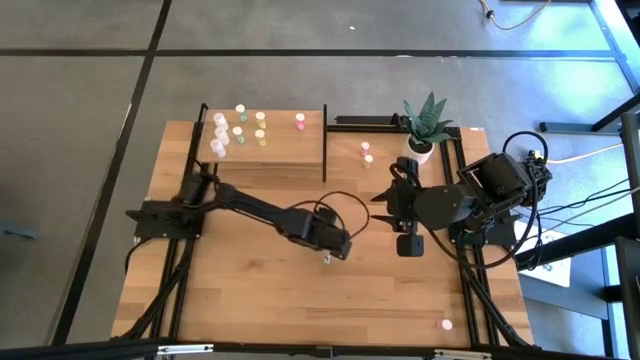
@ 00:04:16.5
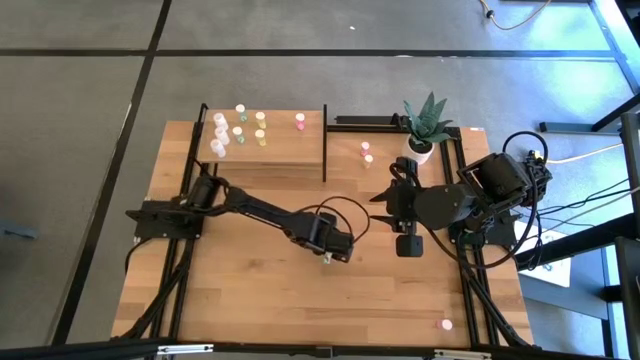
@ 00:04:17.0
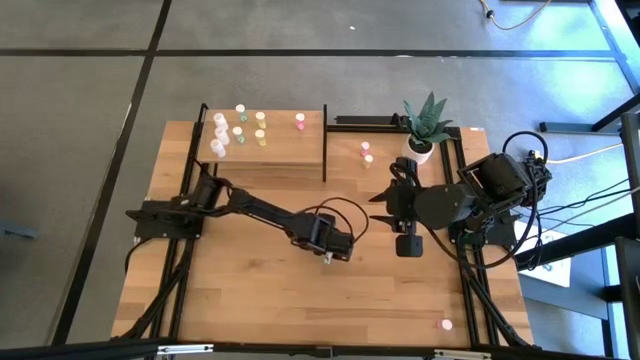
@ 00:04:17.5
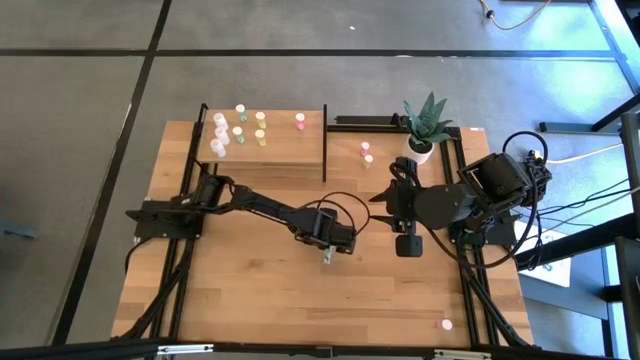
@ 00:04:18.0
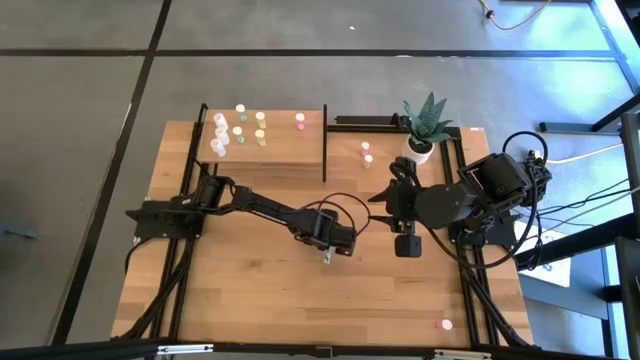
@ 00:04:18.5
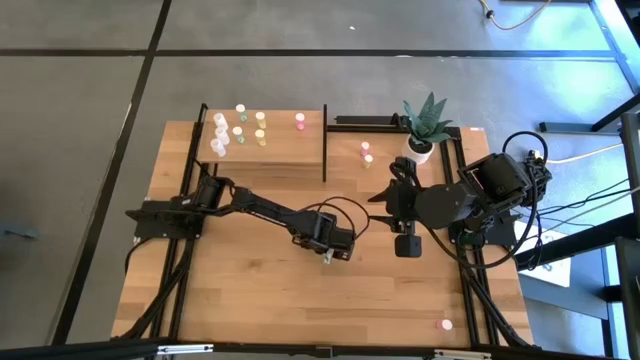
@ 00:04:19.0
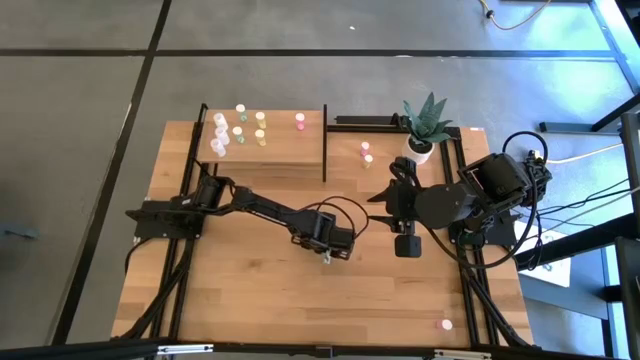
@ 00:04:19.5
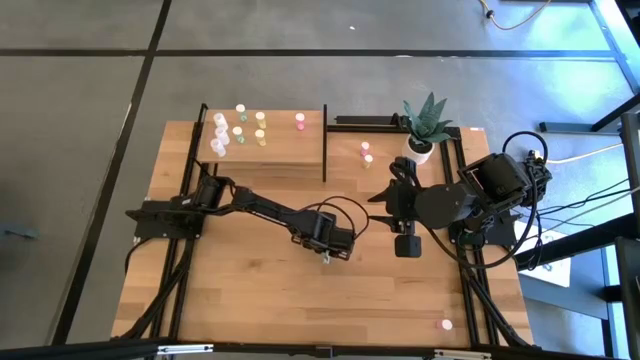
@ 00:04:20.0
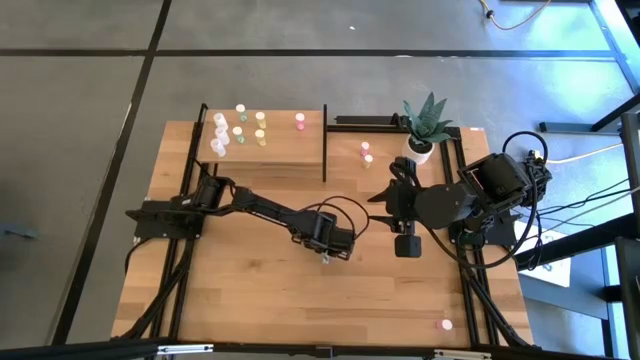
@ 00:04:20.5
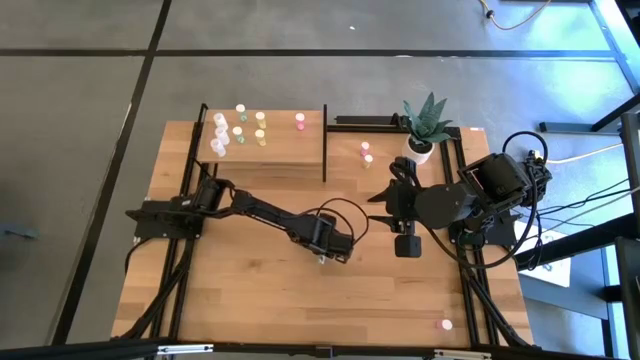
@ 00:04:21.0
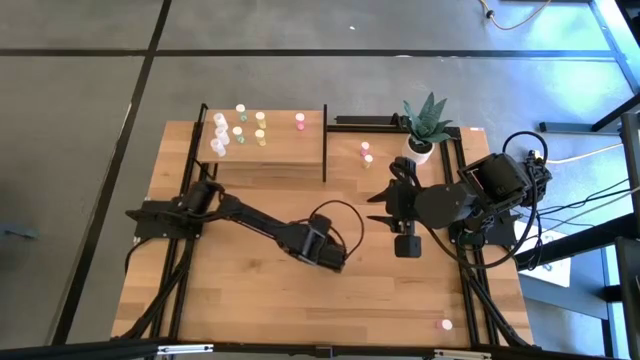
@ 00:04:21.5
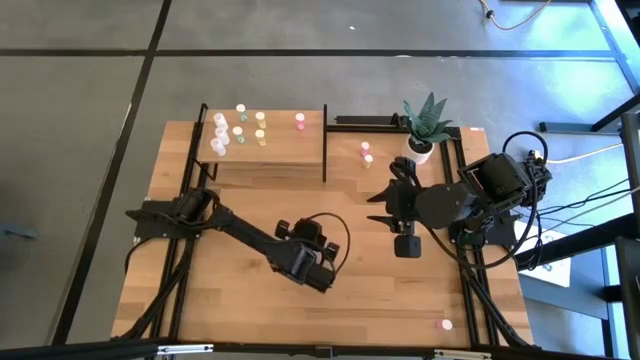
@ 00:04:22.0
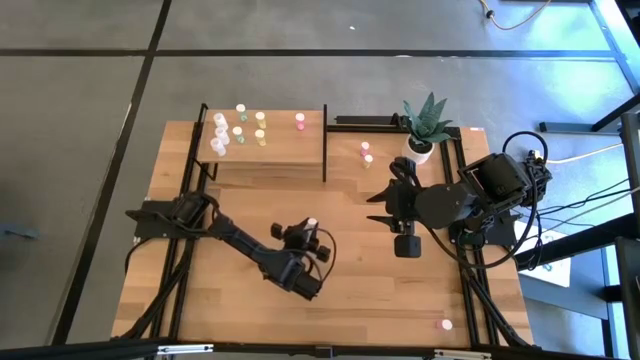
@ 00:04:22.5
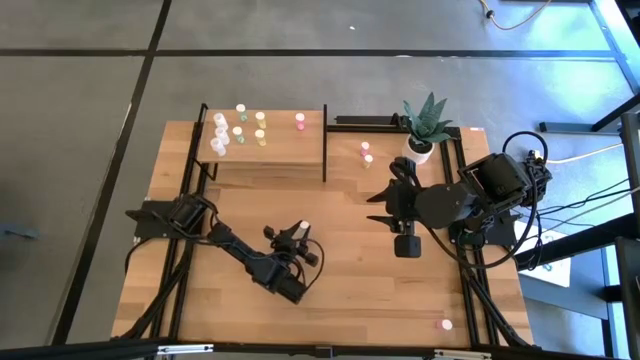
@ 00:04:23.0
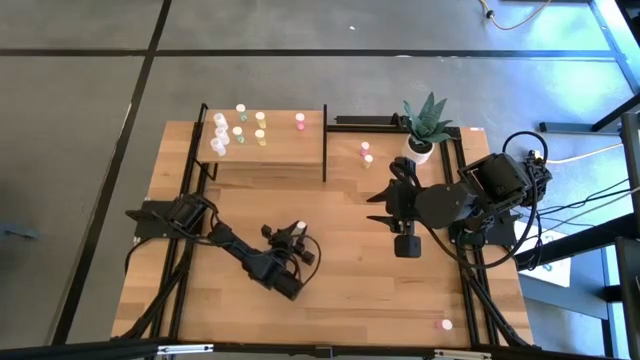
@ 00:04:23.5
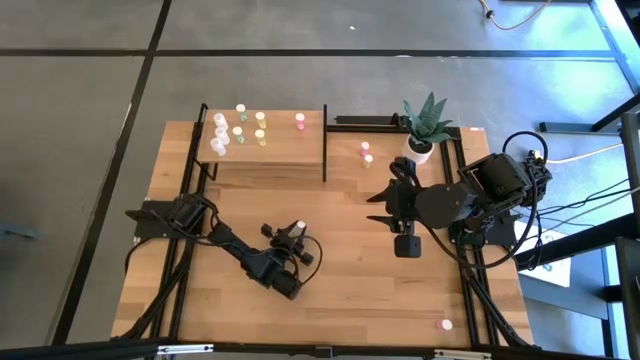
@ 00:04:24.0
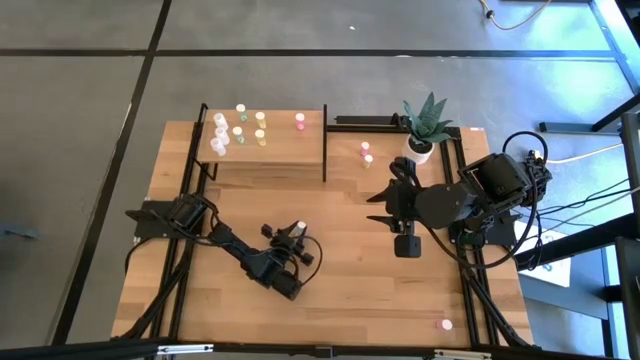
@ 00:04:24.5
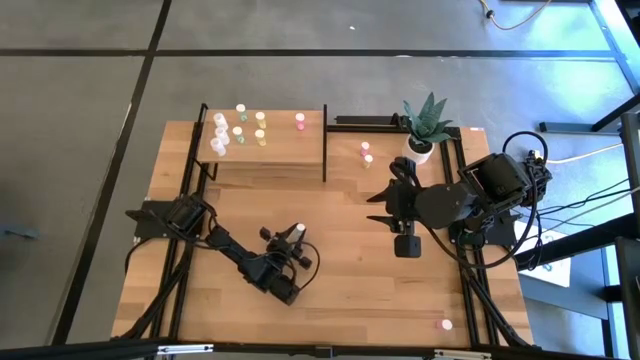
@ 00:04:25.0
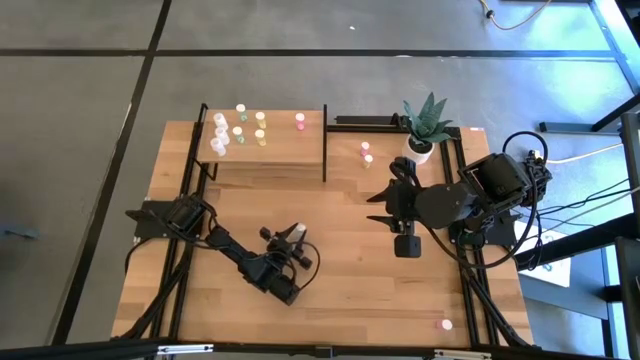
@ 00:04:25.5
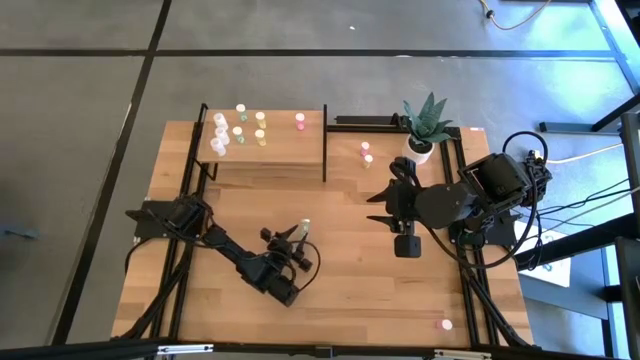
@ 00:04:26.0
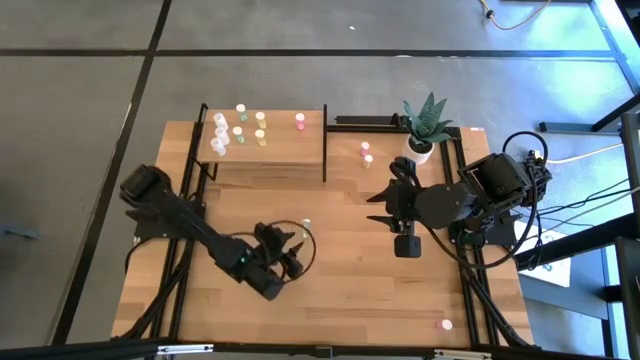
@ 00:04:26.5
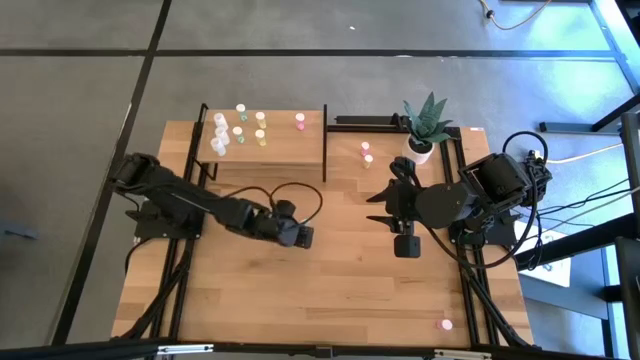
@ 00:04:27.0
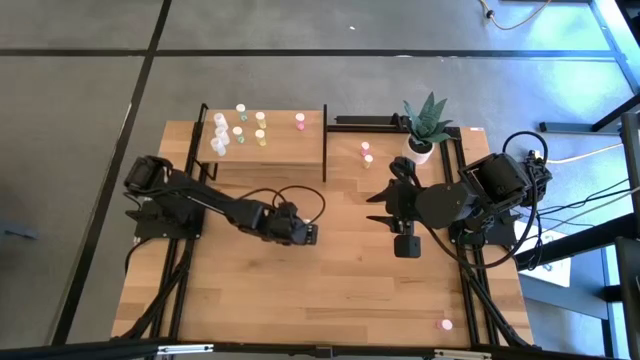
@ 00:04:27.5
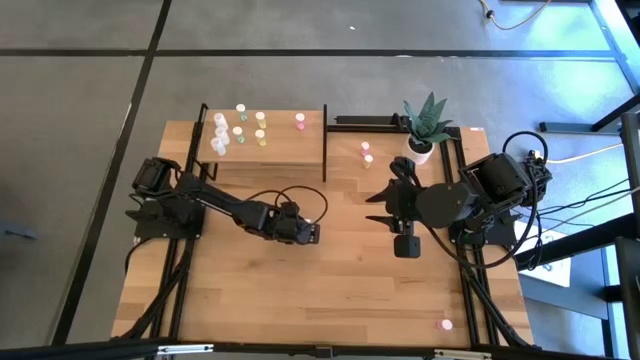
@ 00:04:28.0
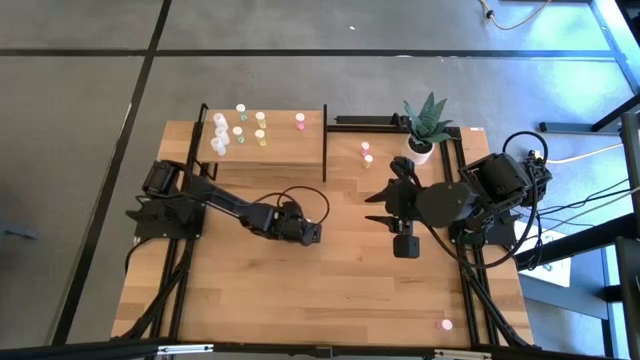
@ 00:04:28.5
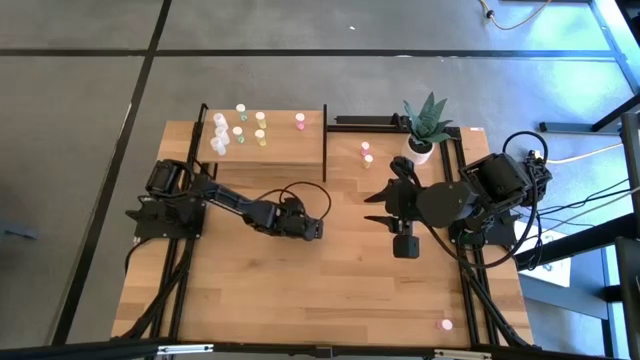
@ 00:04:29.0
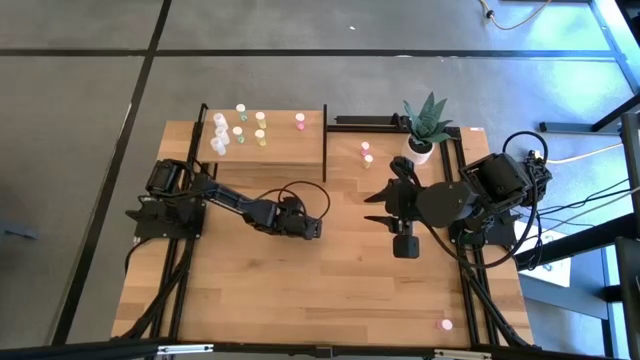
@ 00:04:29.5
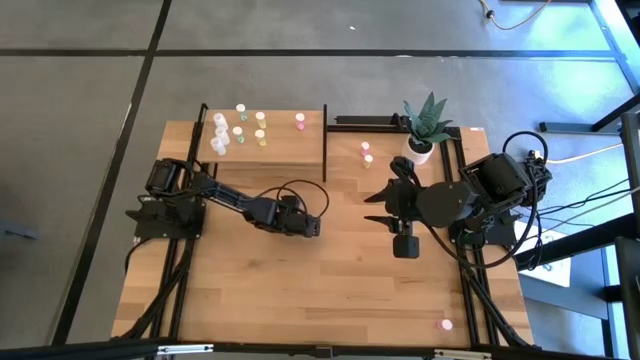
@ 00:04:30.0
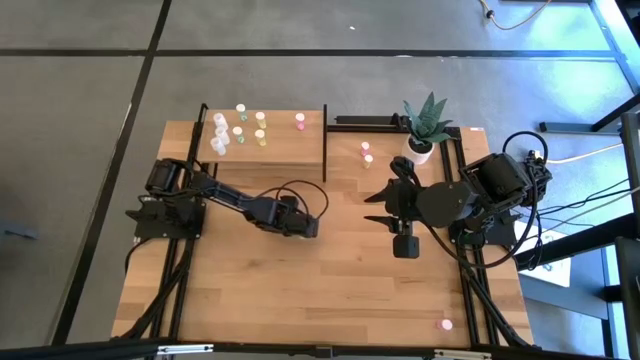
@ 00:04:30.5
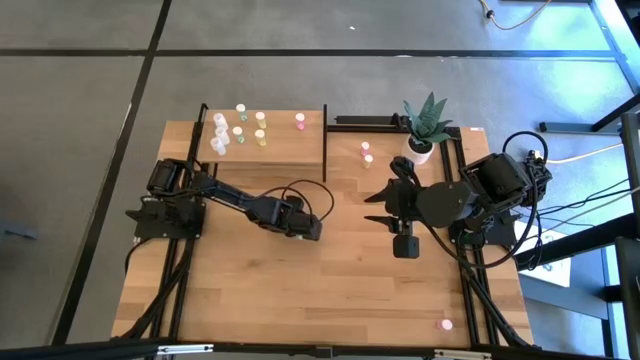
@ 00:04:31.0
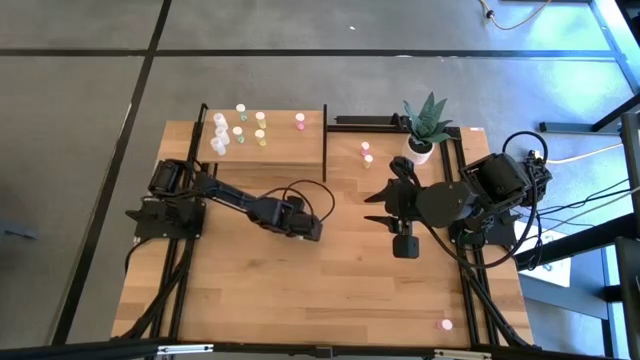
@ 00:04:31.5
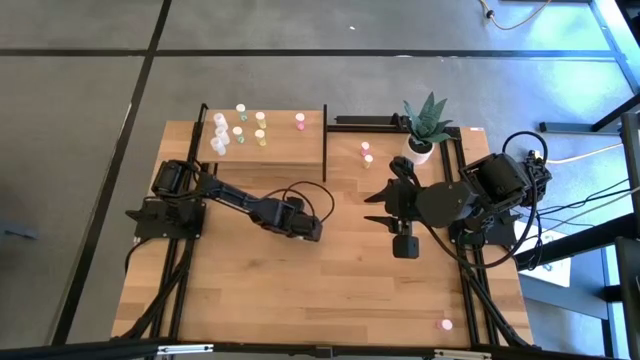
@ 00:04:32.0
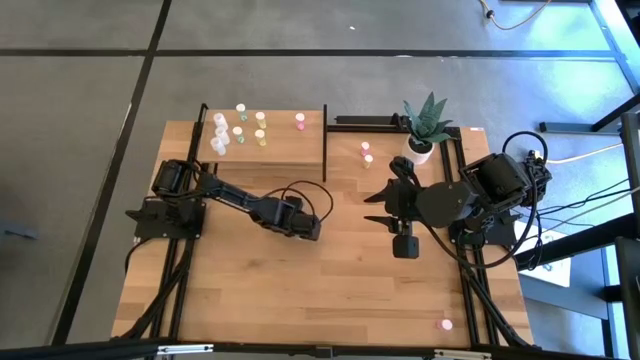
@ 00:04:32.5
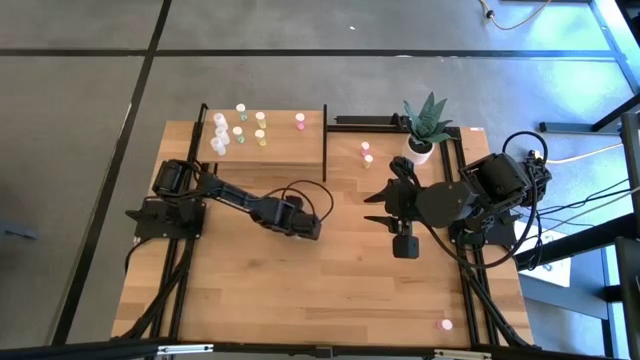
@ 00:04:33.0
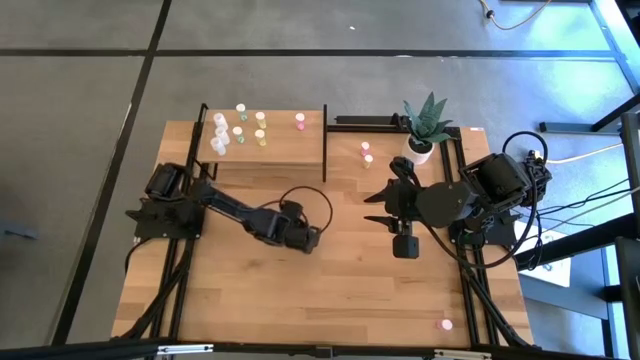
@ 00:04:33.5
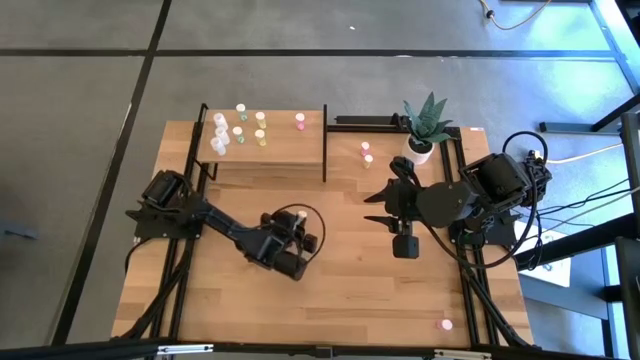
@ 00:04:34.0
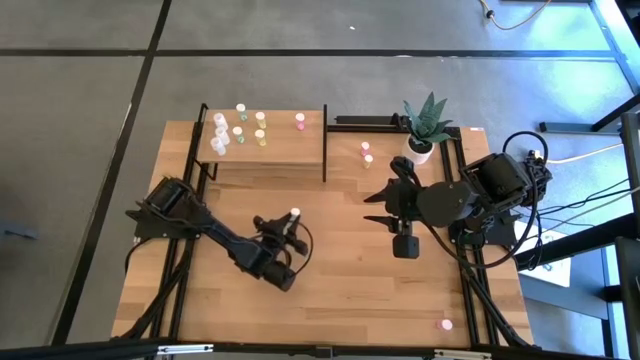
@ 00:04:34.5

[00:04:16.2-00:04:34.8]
Task: Pick and place medicine bottles onto shelf by color
Put the blue pill bottle aligned with the other blue pill bottle on the shelf
